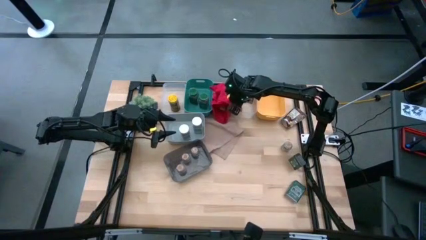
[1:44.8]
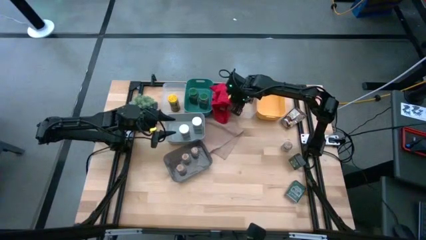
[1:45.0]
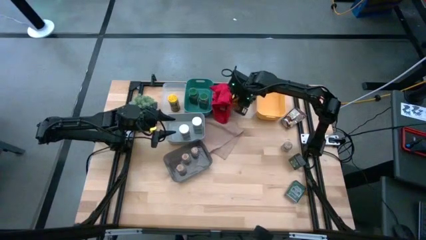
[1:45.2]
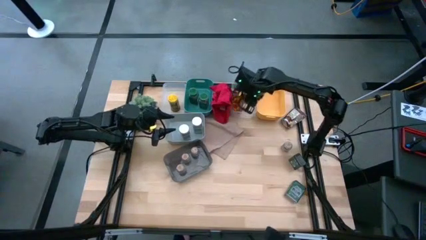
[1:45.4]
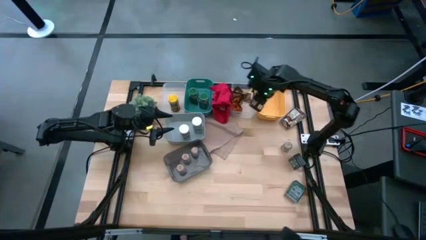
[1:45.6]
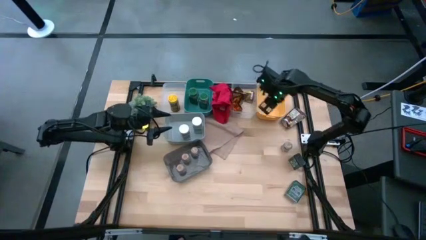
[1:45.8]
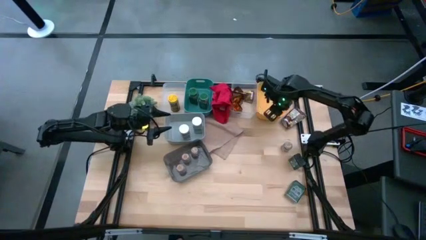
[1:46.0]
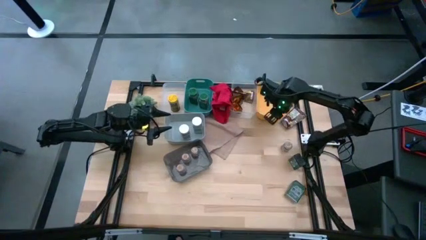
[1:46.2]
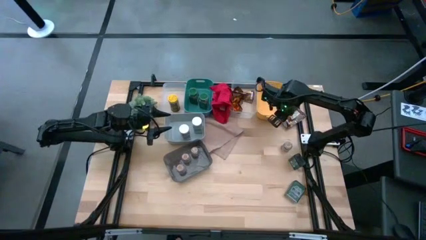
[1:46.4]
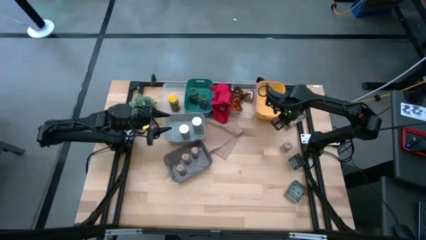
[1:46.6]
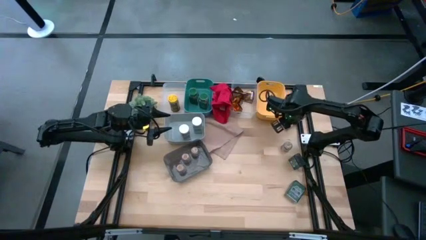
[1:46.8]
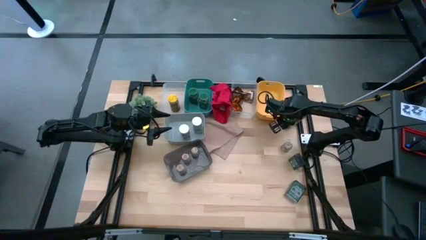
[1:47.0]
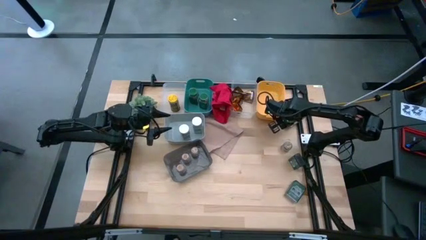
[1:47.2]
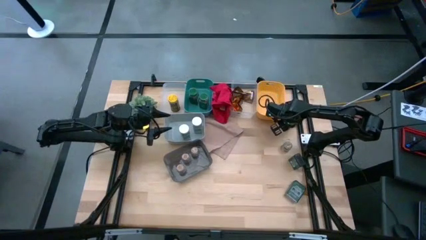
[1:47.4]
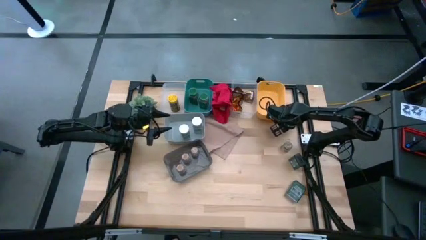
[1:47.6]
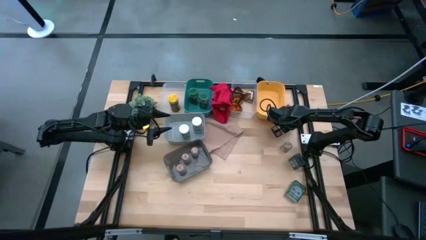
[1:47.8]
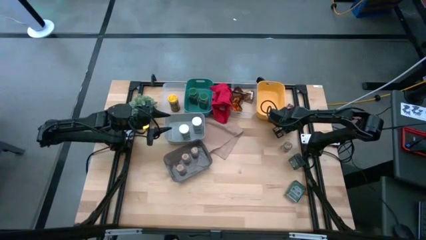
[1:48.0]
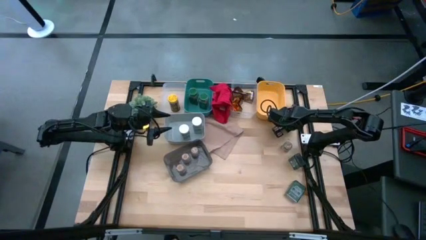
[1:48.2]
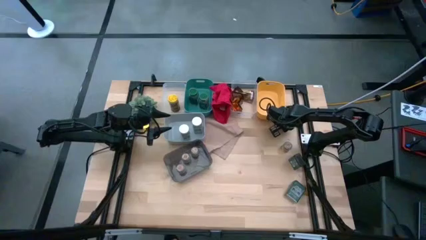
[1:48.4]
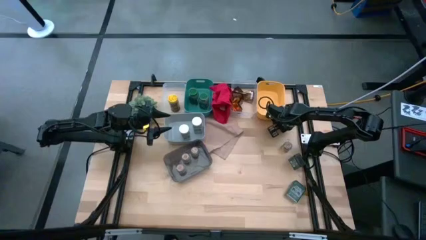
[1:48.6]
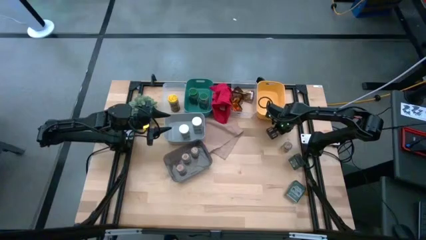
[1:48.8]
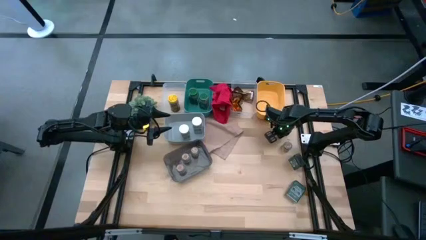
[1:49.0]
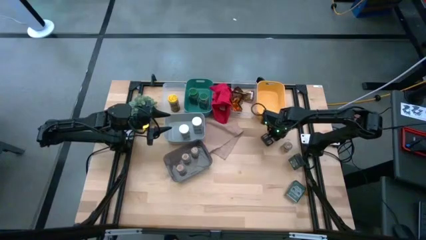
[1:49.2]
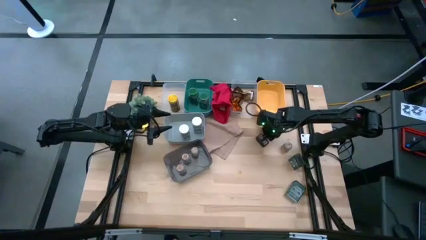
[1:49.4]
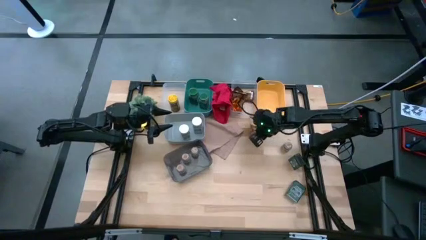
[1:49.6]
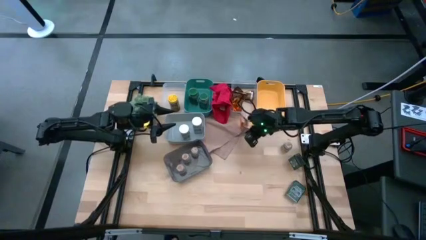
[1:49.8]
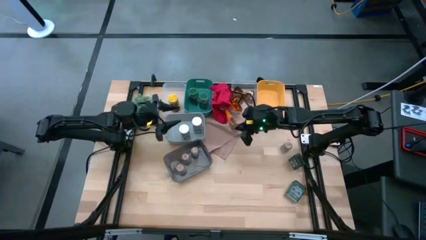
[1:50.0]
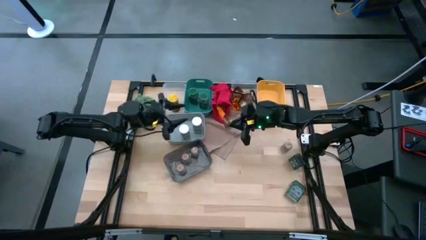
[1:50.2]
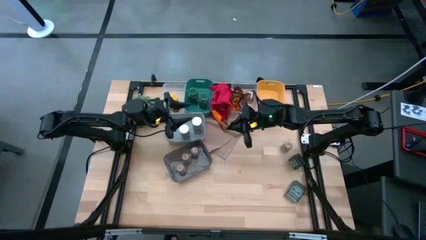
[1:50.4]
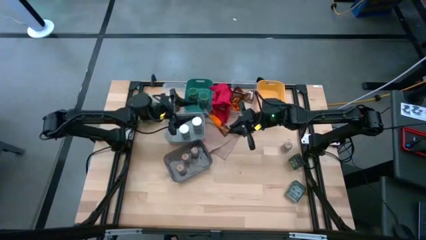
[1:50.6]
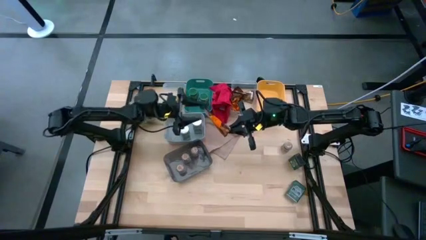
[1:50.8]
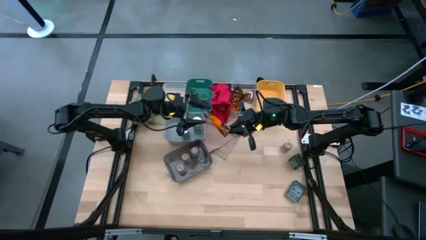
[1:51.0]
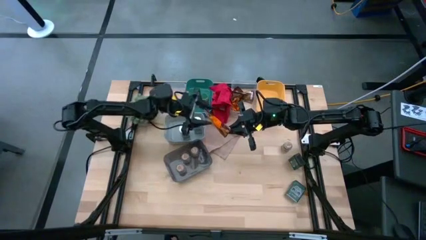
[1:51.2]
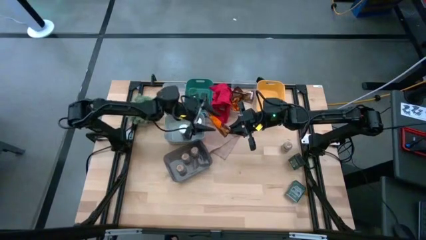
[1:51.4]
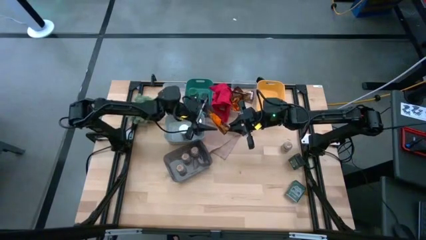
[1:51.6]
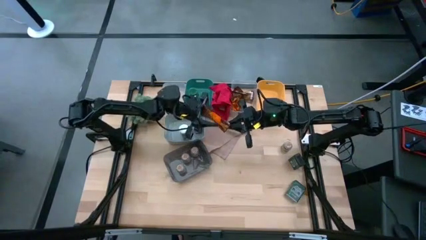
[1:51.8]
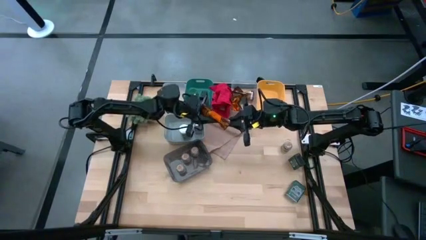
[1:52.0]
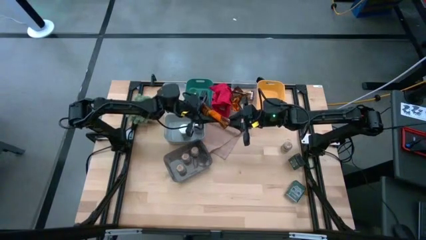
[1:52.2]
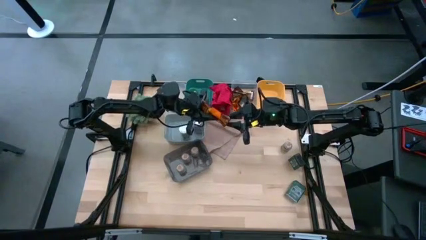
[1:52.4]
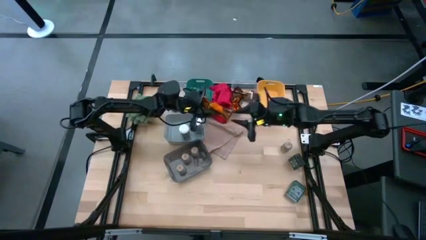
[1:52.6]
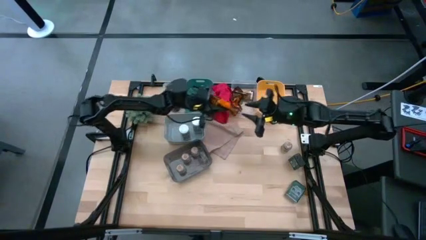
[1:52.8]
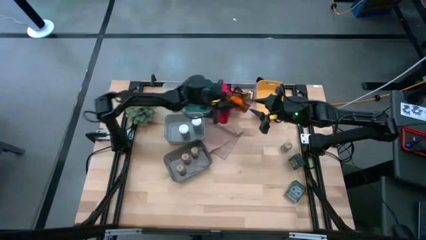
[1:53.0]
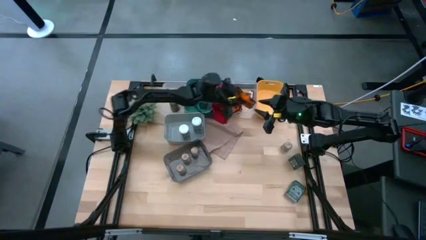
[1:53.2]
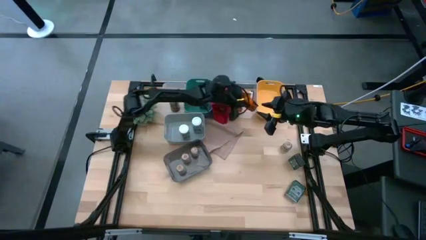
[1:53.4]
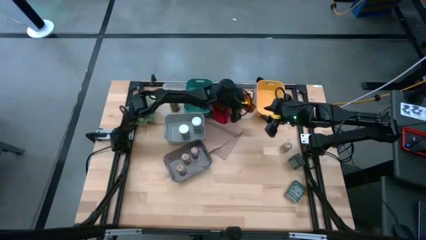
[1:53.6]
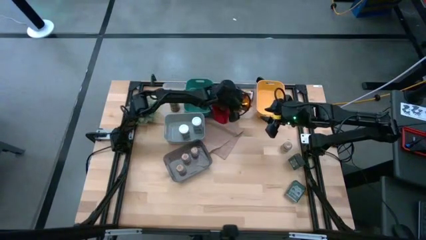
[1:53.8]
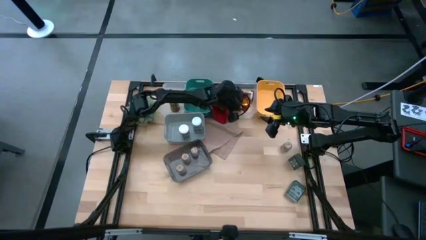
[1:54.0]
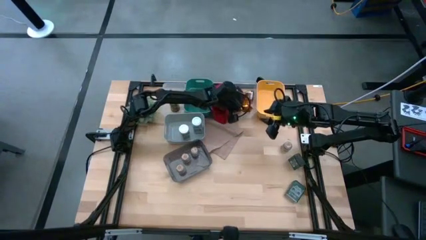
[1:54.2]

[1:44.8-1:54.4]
Task: Sort spices by type
Put the orange seasoning pack into the right transparent bin
